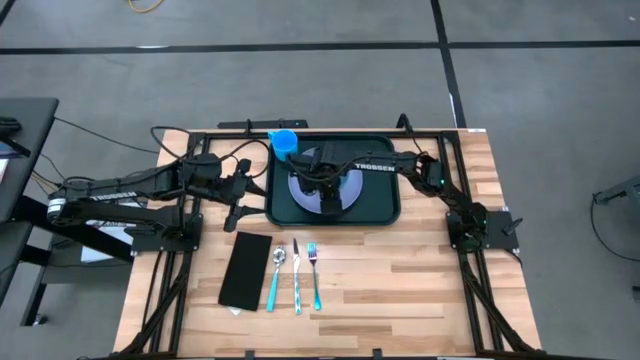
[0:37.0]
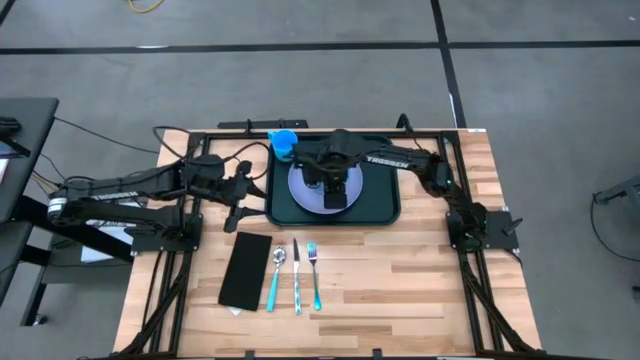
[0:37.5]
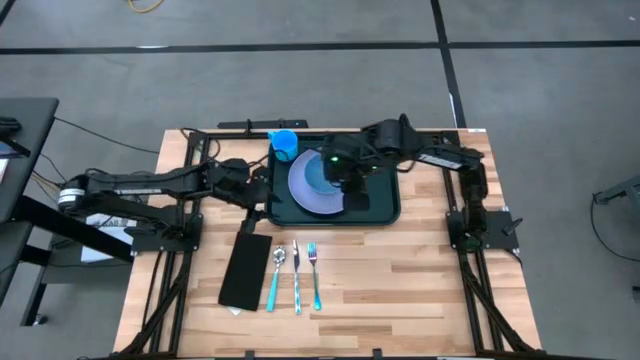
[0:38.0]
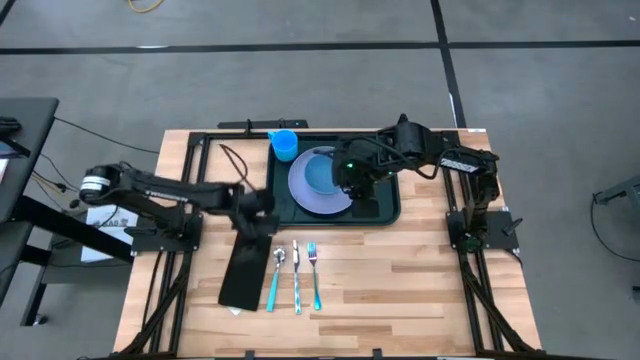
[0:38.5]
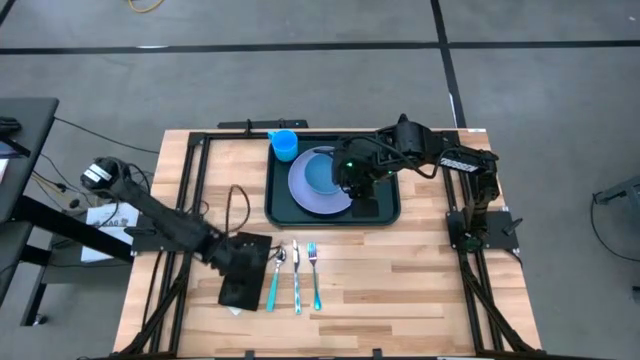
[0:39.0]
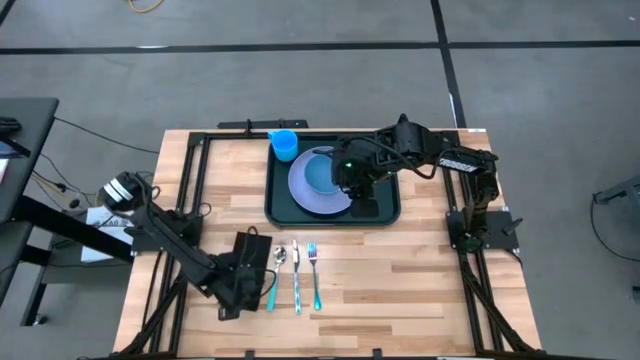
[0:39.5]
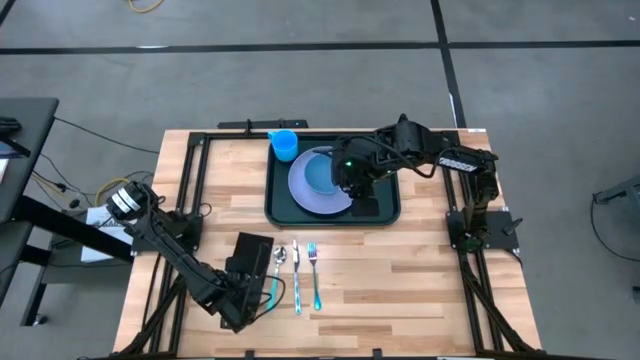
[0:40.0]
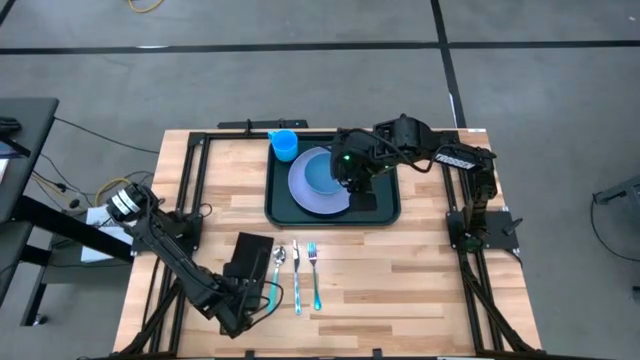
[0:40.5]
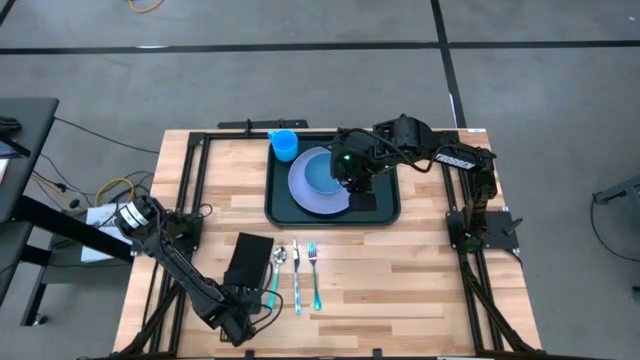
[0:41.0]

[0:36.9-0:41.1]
Task: Set up tray
Put the table napkin to the right of the purple plate on the tray

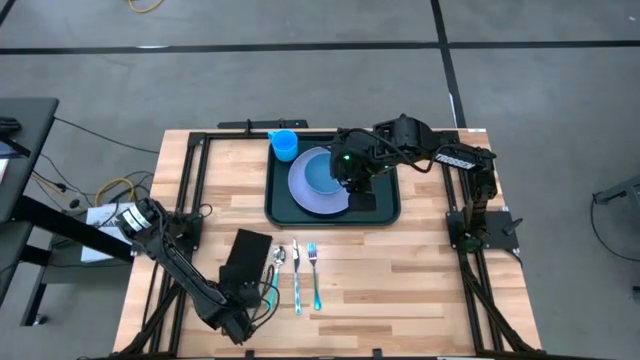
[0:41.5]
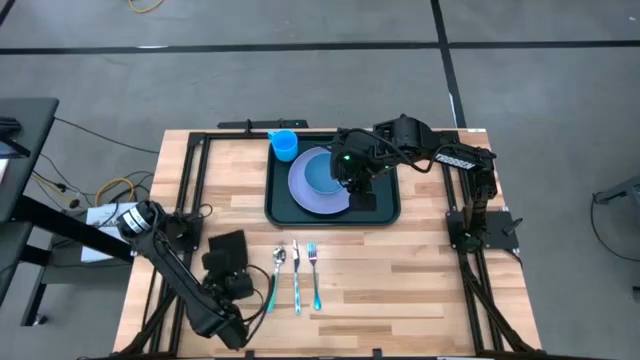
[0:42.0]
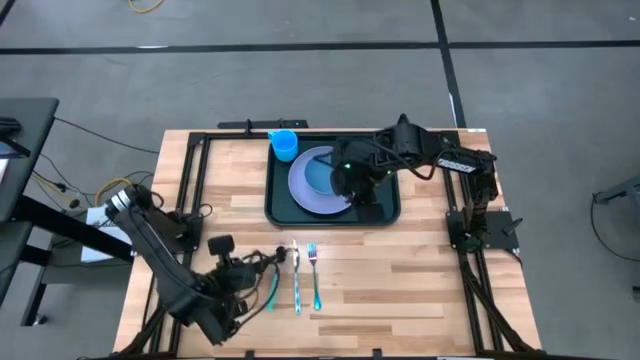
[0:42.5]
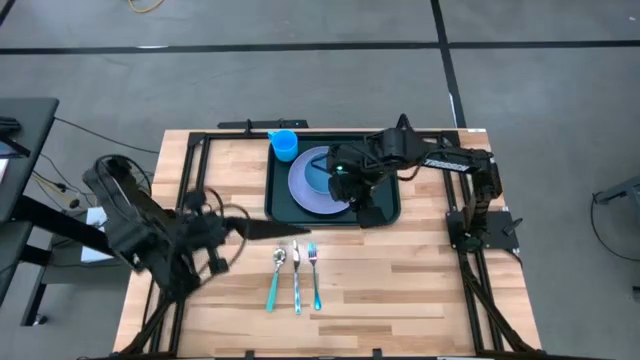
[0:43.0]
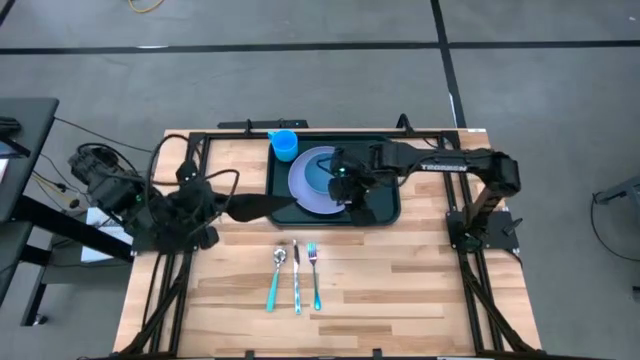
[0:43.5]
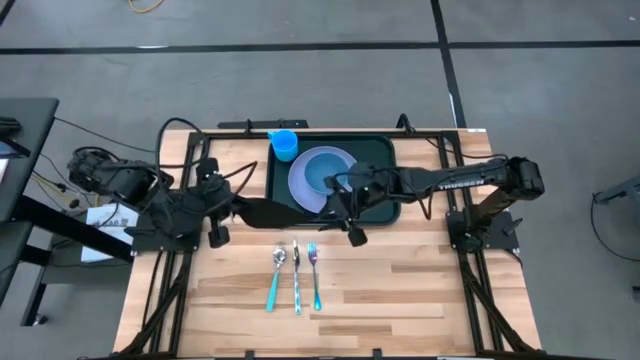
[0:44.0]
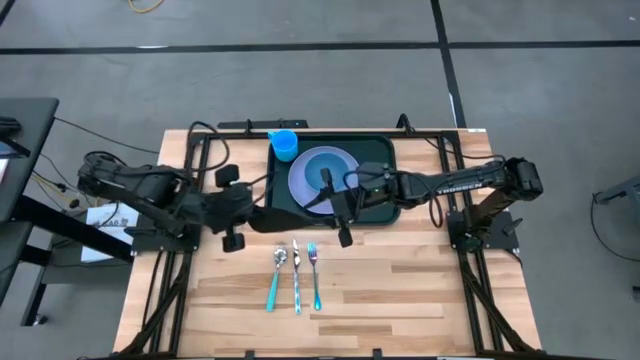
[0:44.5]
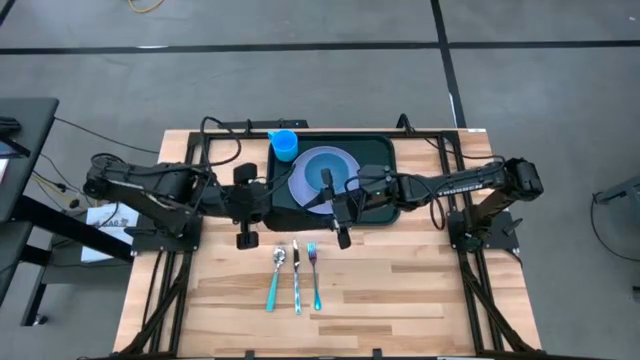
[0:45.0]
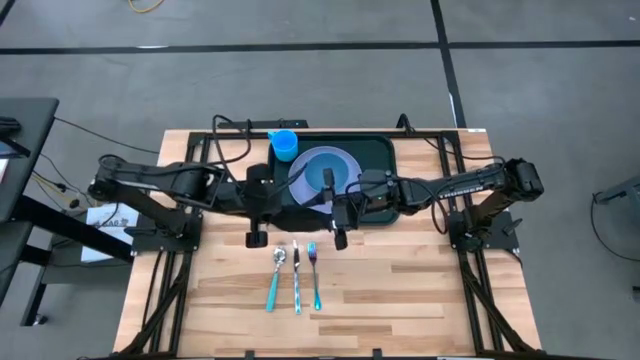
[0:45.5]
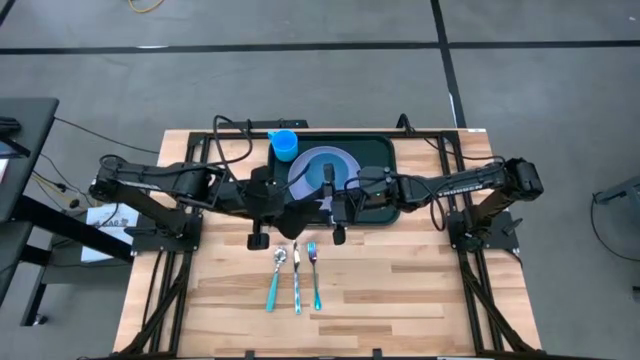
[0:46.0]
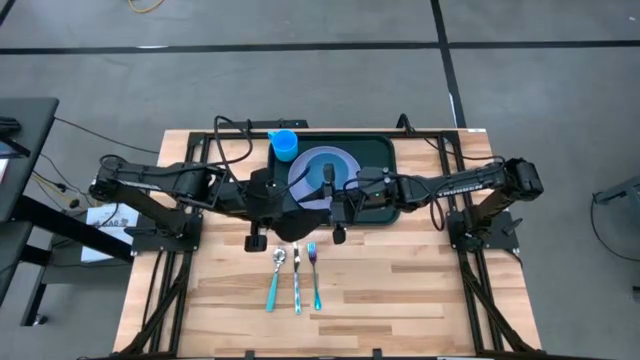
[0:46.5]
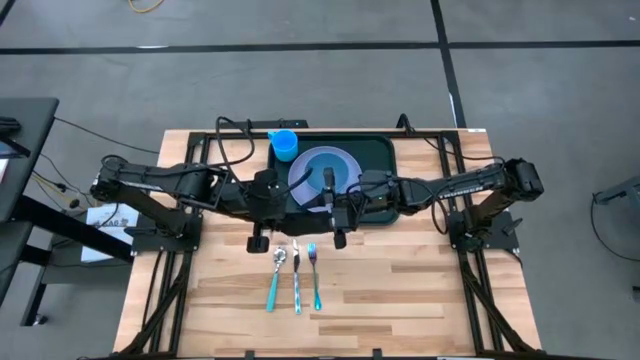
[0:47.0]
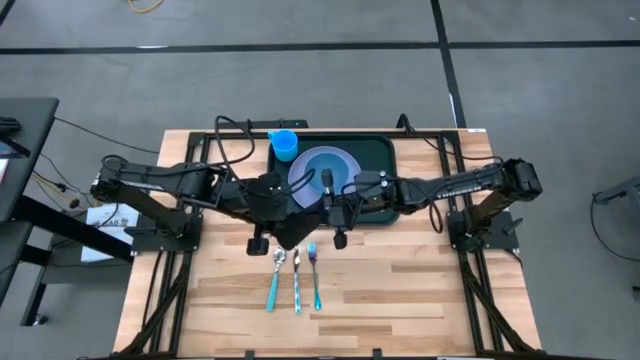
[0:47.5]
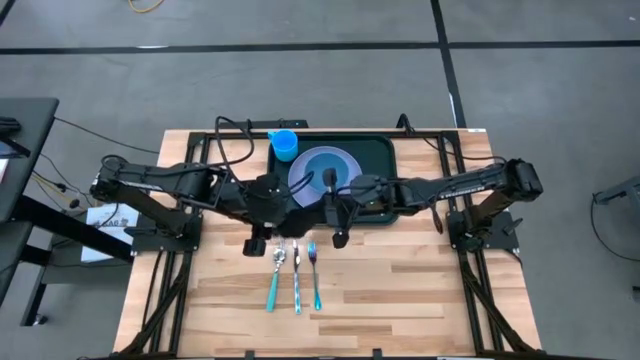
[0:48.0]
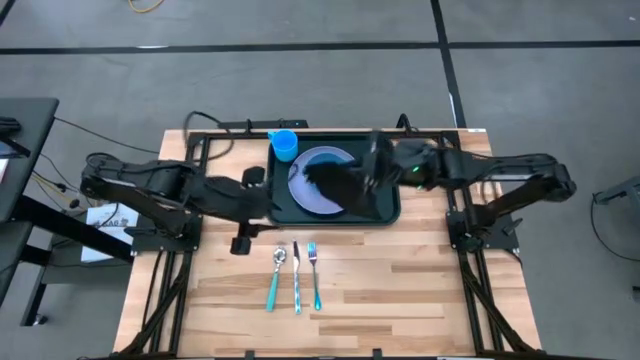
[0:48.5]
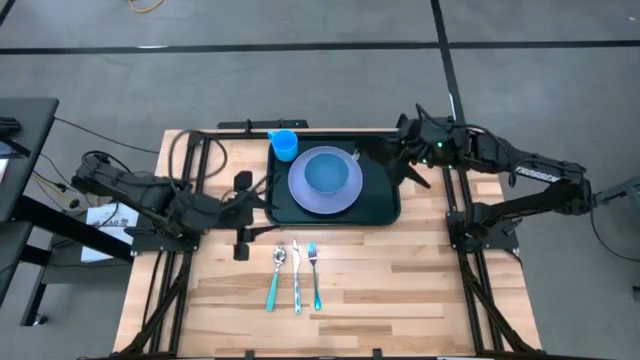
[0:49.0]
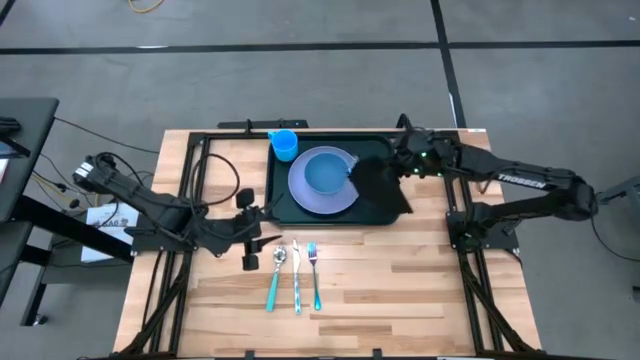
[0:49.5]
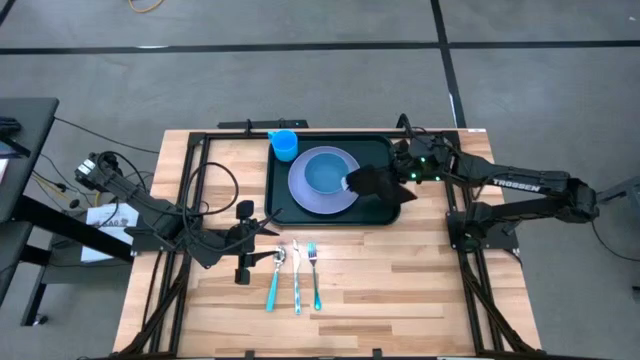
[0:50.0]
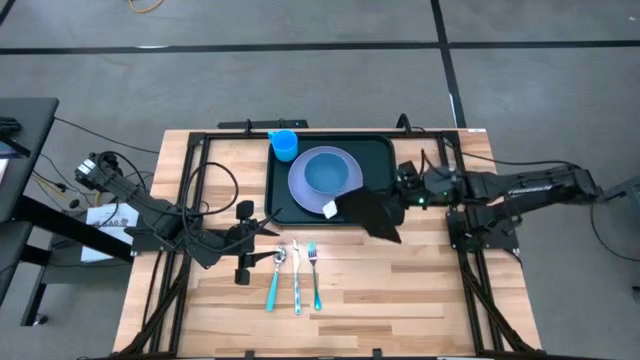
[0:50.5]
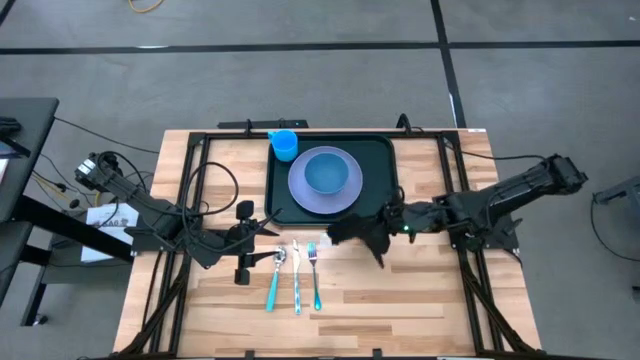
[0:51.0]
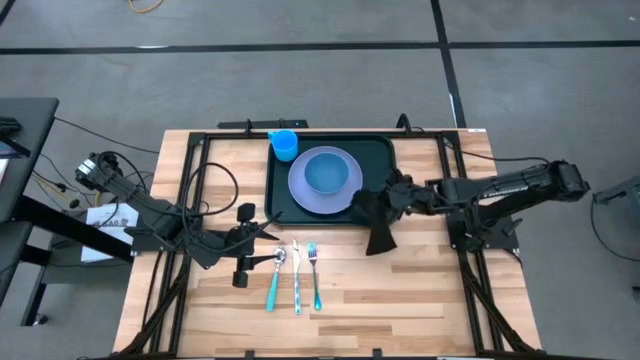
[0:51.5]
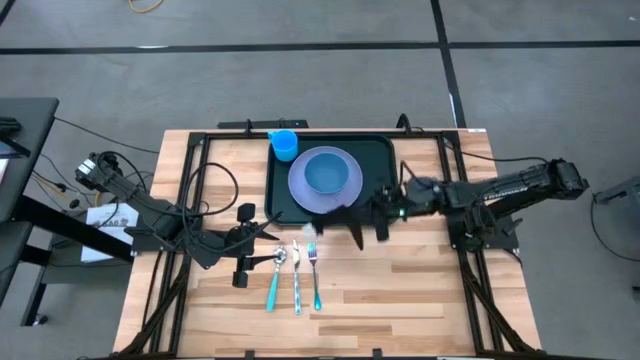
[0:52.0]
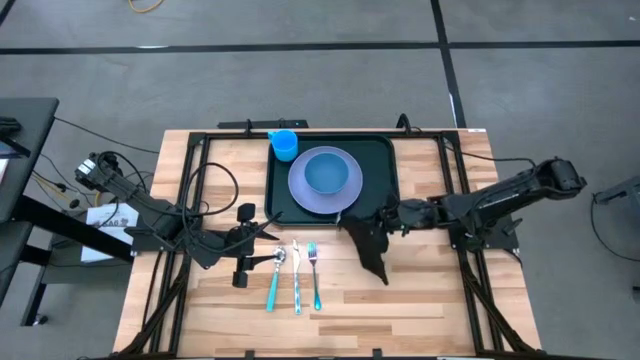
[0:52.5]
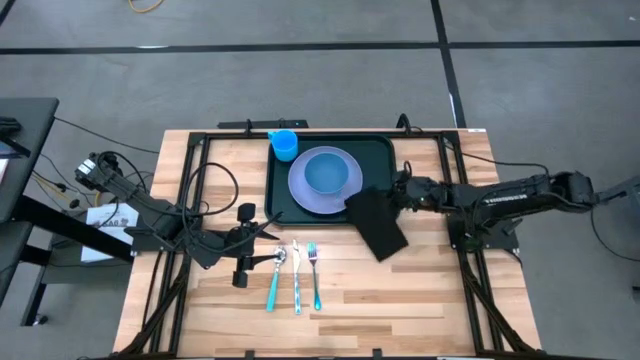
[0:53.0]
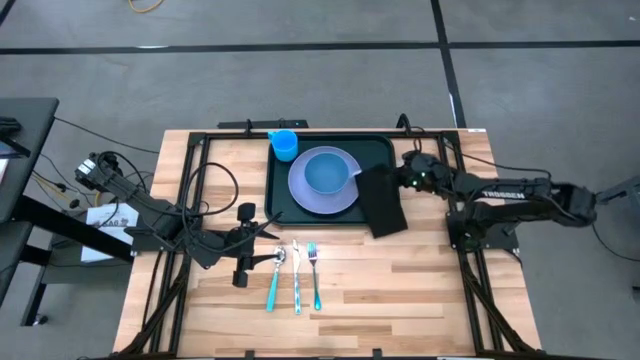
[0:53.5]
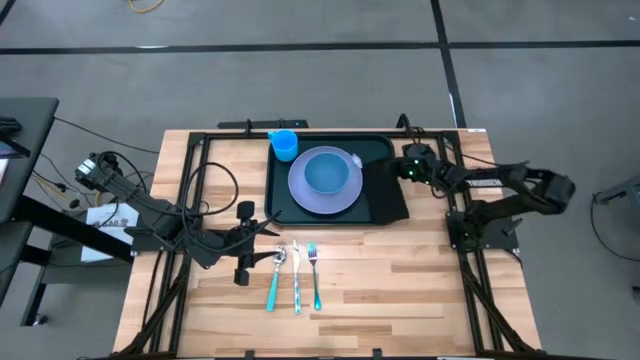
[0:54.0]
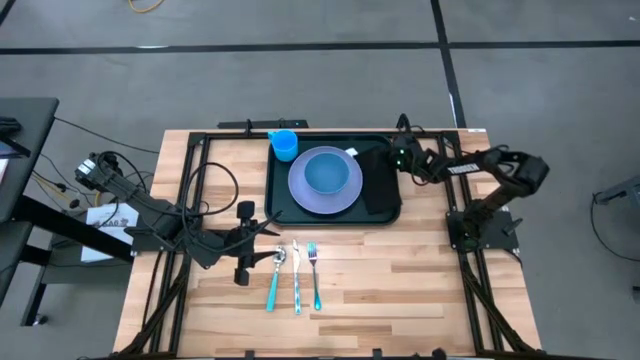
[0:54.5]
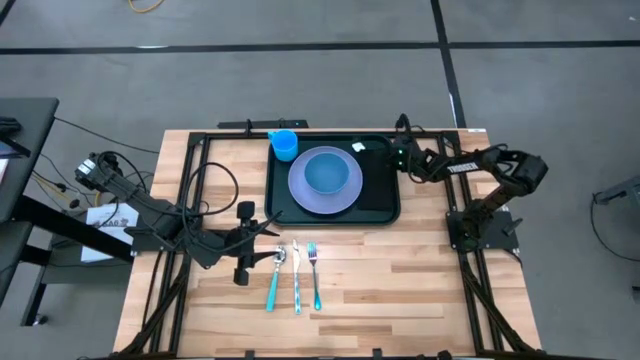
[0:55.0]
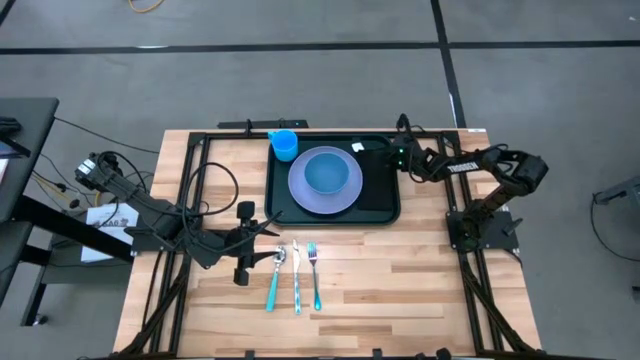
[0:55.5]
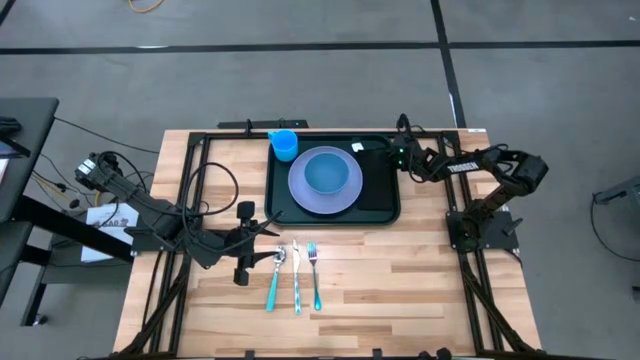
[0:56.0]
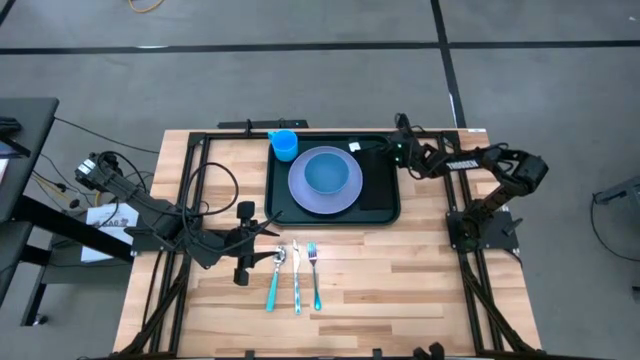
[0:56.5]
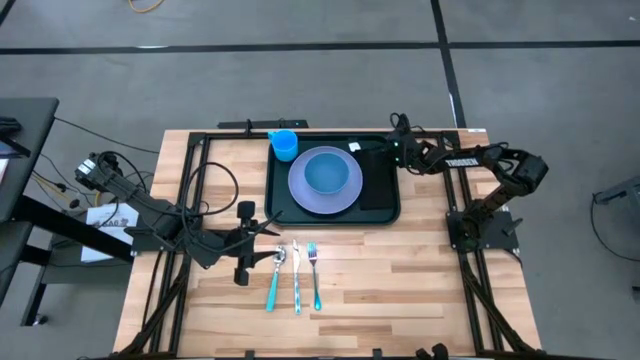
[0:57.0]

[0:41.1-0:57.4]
Put the table napkin on the tray to the right of the purple plate
